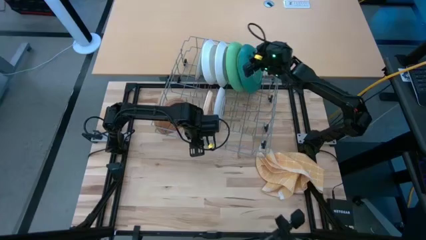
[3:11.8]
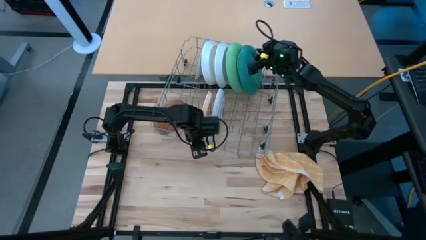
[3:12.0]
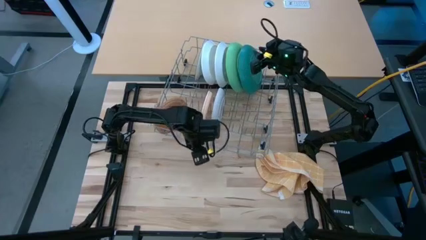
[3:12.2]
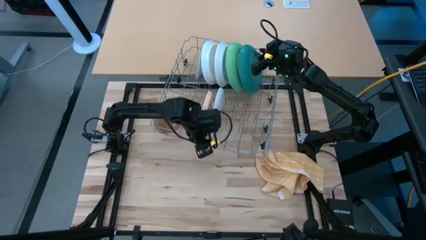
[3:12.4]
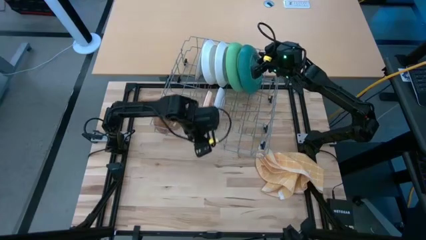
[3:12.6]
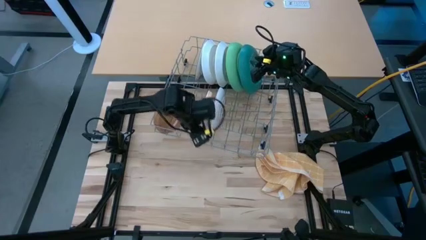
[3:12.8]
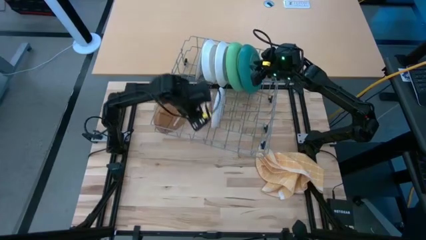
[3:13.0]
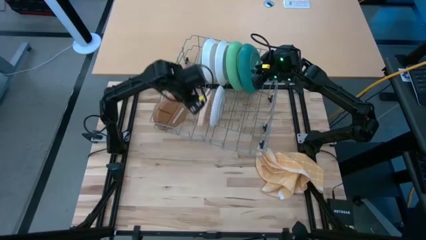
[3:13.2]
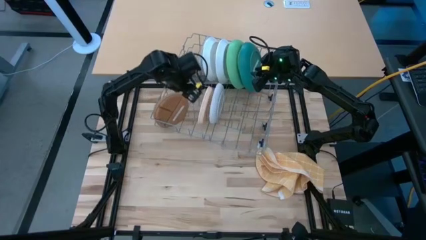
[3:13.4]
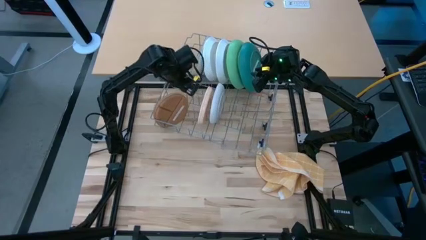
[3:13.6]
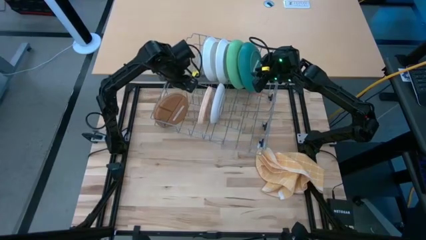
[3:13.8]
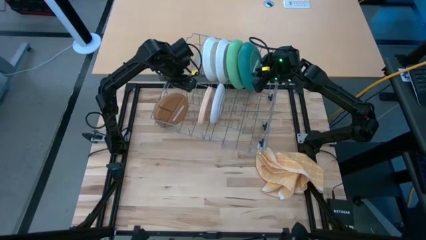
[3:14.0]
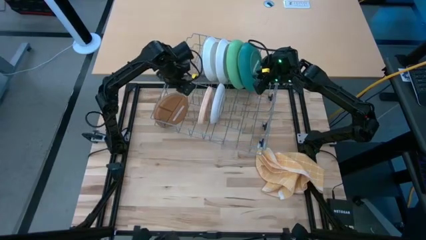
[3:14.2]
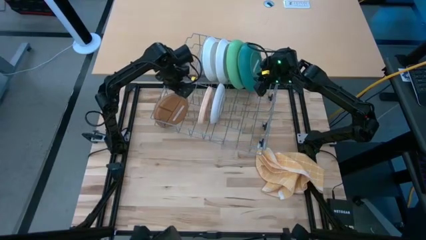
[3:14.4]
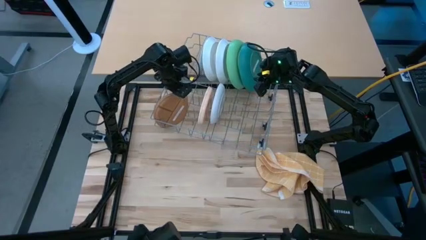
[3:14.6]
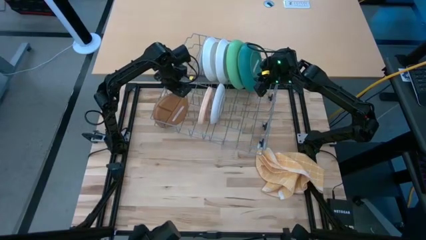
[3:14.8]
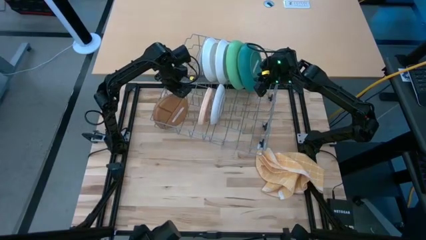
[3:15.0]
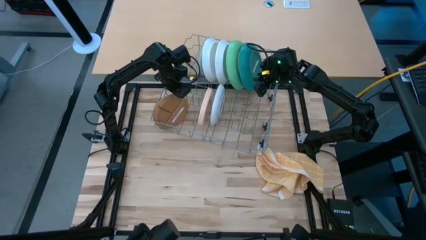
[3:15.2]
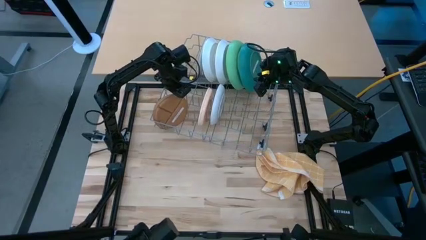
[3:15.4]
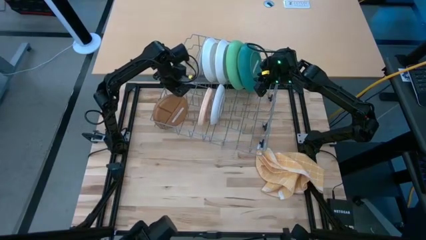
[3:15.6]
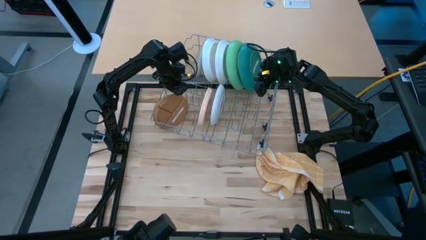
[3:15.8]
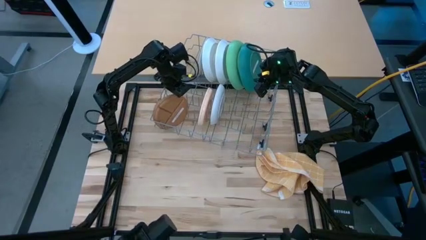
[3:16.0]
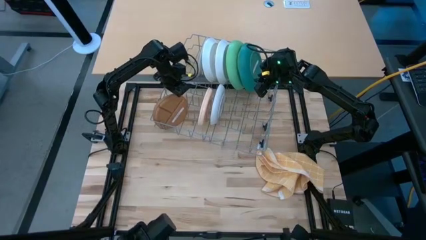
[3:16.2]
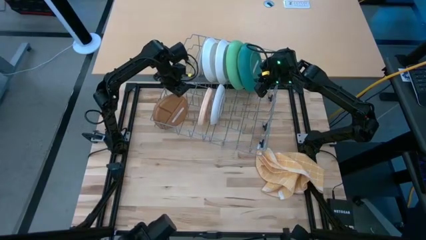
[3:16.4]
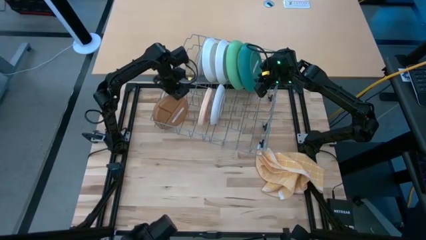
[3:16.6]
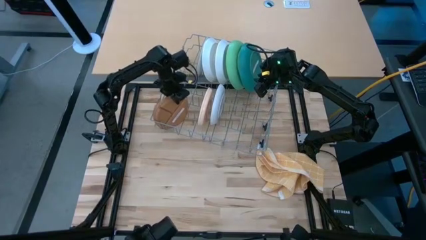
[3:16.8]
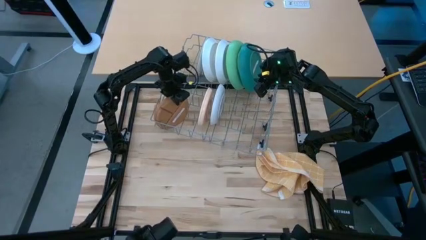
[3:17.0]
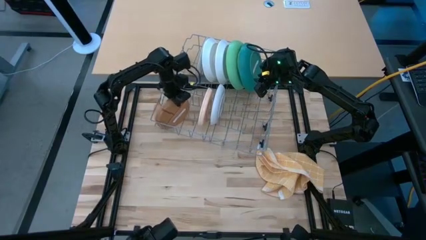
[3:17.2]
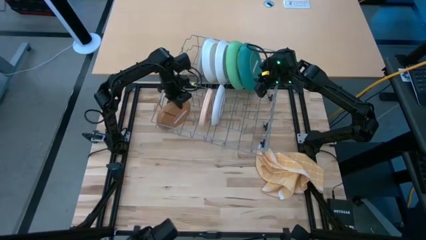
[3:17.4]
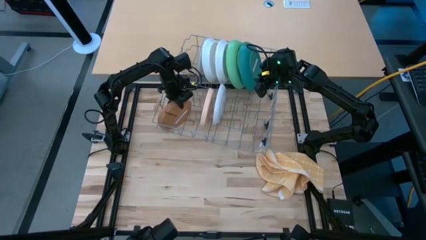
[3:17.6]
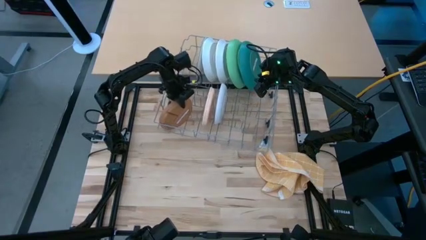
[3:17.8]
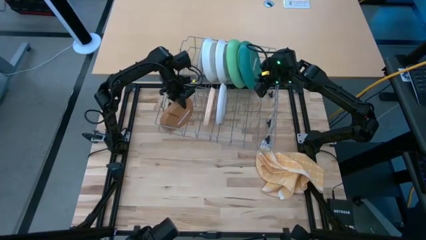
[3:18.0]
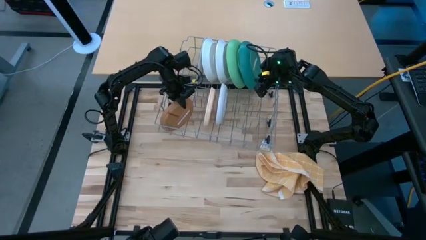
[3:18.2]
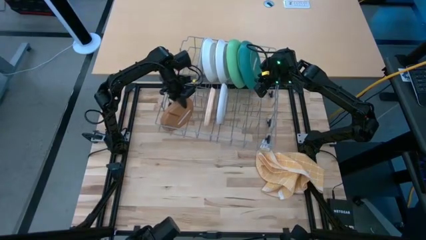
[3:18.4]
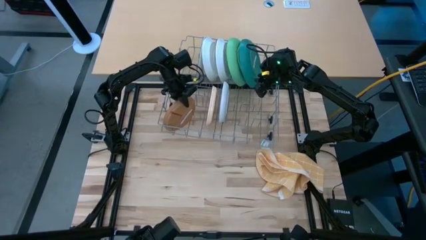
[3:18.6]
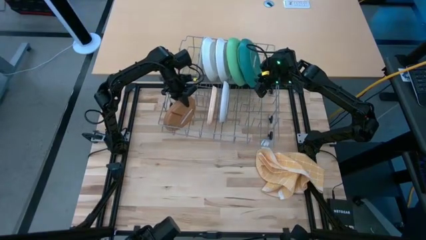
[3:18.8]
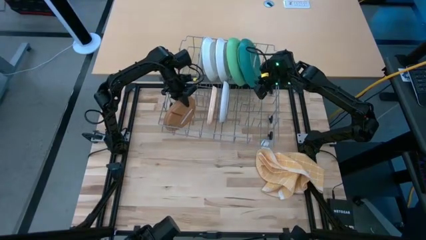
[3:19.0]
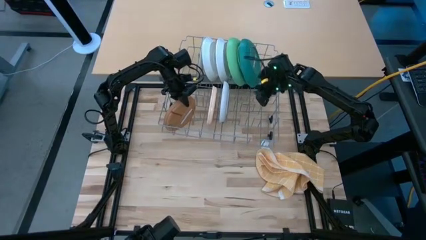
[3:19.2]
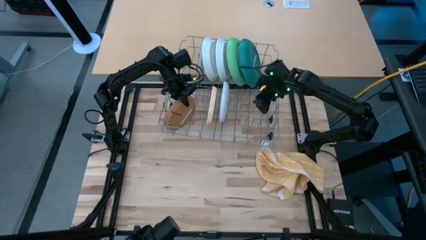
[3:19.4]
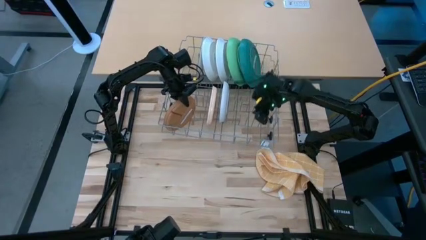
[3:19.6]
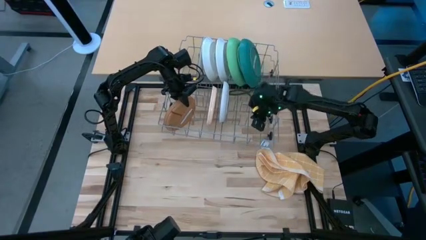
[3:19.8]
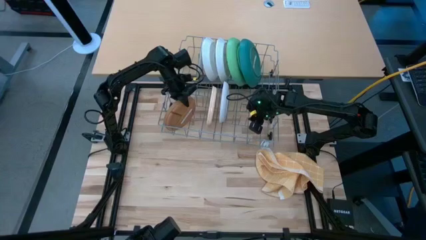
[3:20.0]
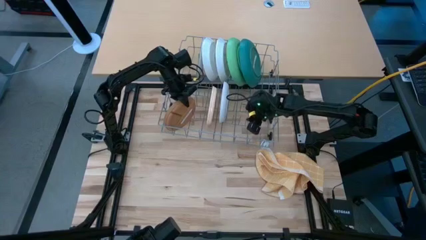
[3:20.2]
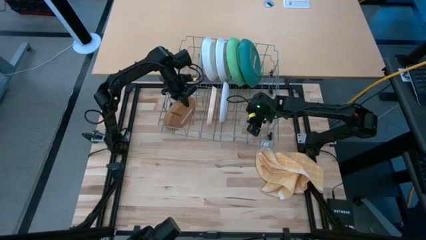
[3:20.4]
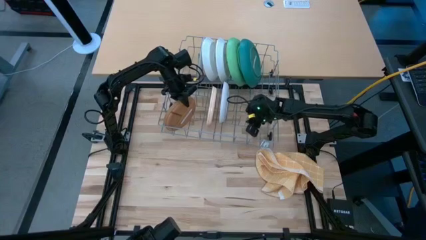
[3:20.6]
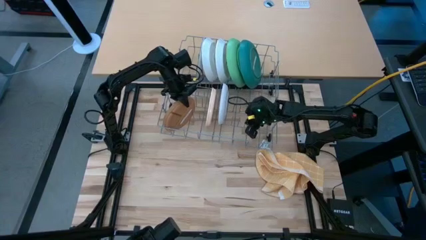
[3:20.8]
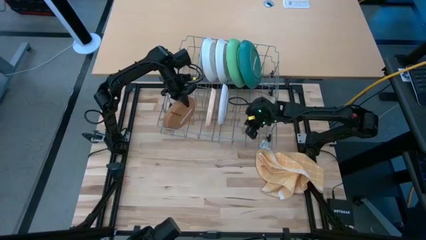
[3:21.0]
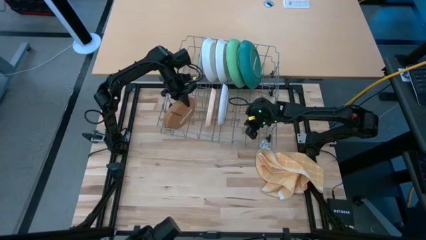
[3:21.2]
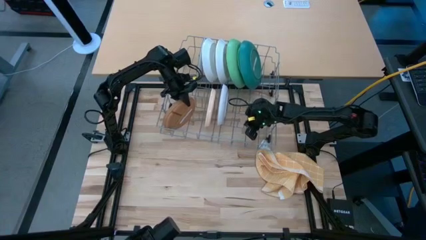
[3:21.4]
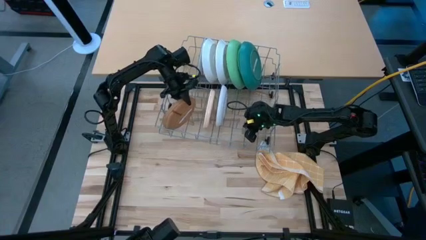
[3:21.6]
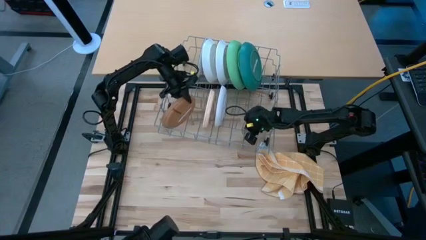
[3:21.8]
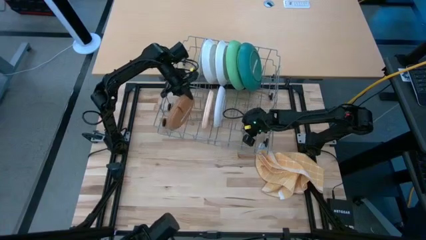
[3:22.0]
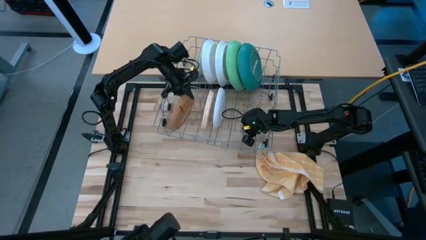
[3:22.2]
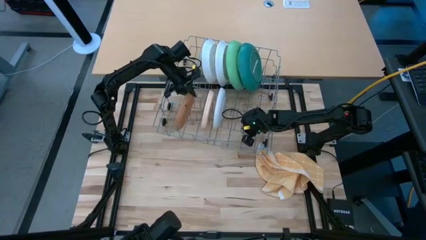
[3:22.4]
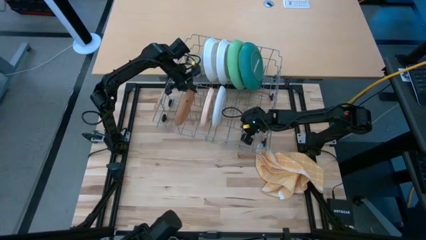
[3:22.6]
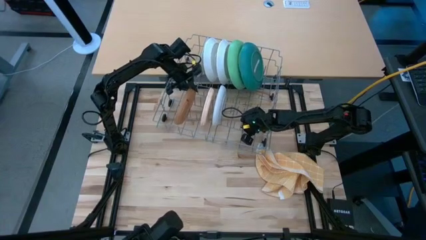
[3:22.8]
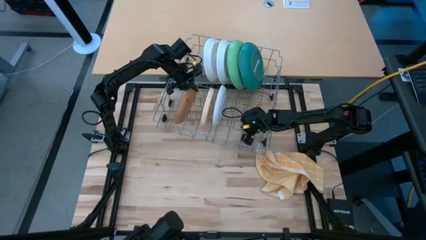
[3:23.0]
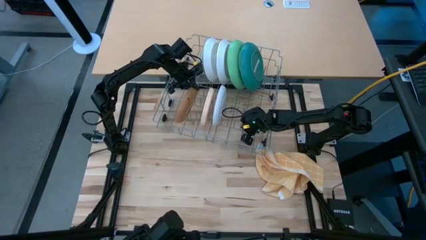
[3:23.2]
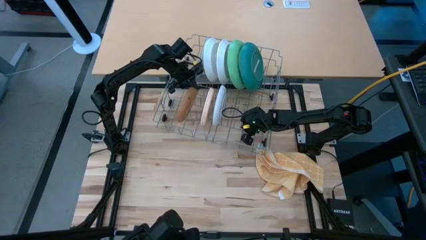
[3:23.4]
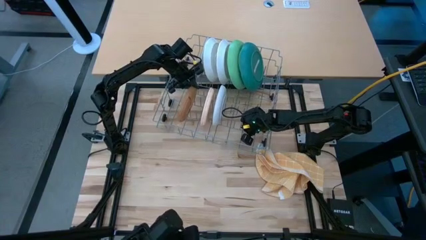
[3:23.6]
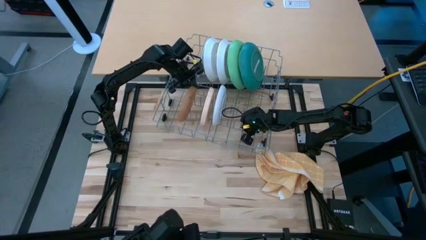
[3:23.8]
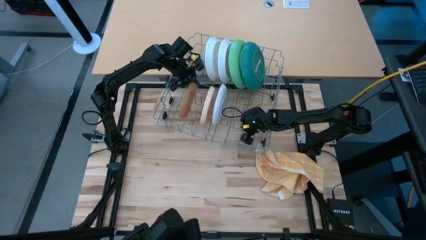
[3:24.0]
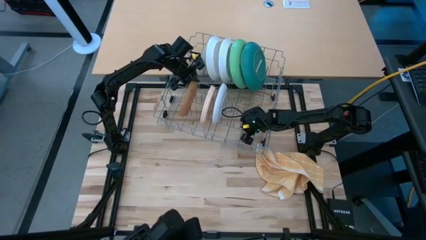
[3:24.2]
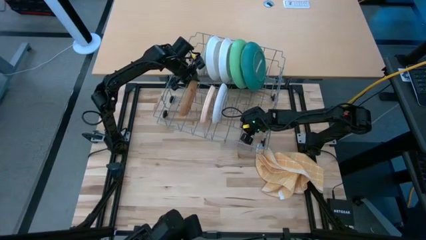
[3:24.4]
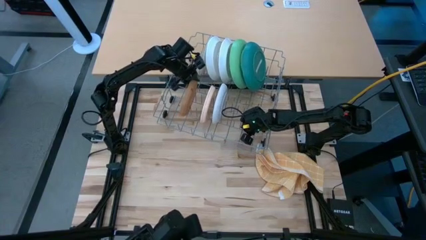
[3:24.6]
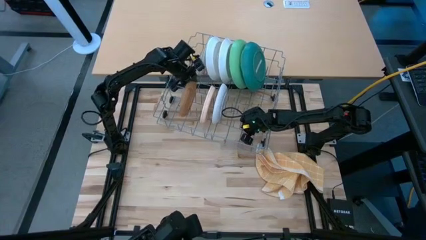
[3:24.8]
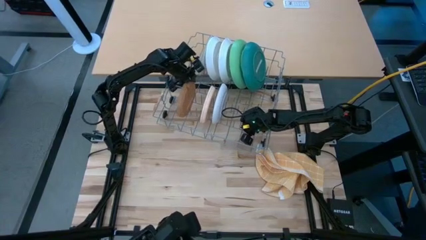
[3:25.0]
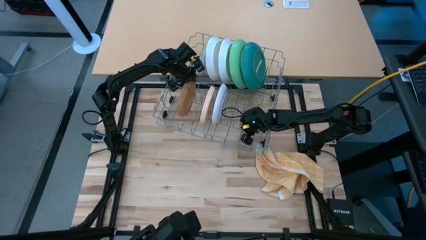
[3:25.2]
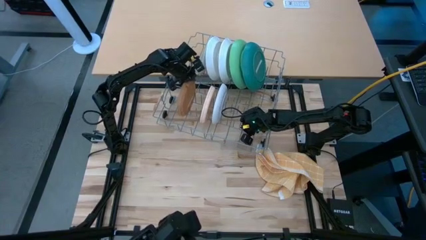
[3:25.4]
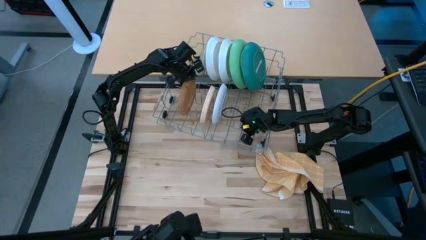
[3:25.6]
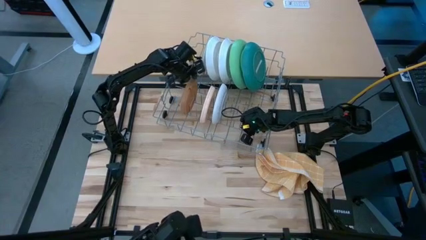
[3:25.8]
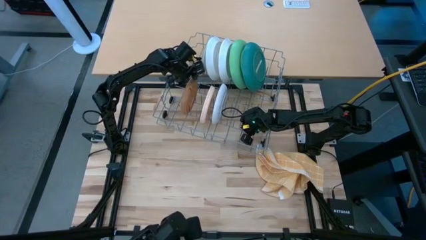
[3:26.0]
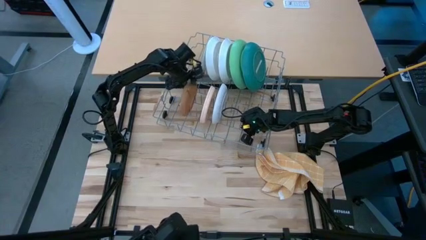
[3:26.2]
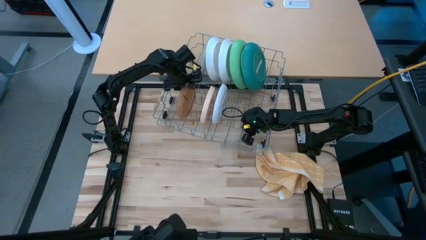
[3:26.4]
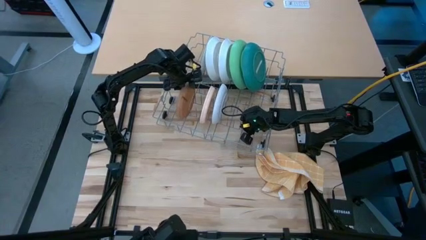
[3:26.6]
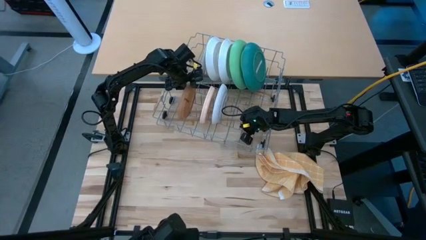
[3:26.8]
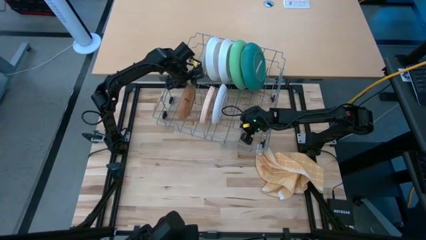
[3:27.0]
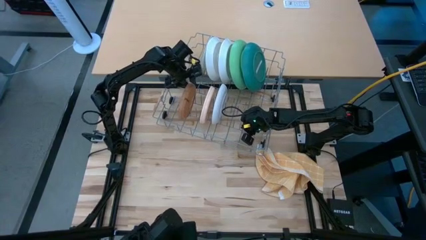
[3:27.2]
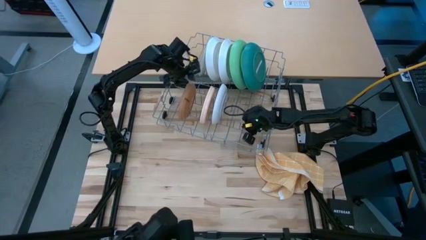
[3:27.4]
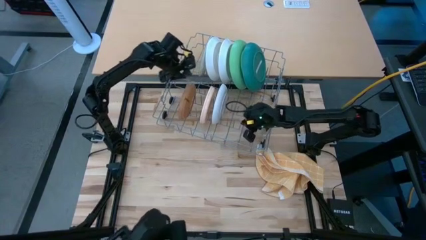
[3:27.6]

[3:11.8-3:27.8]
Task: Sort dishes
Adjust the brown plate in the dishwasher
